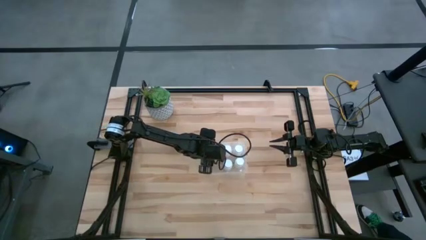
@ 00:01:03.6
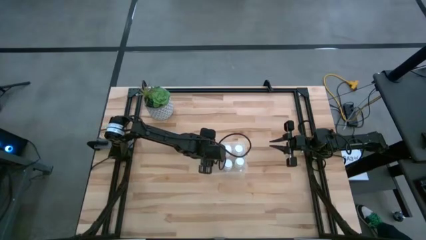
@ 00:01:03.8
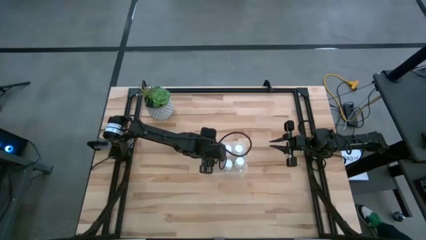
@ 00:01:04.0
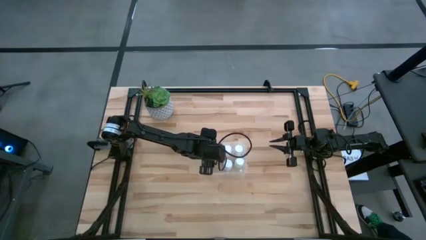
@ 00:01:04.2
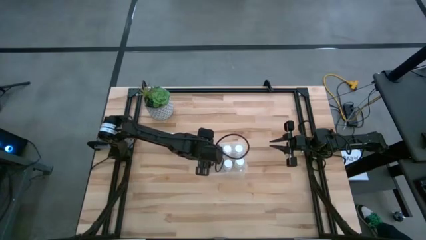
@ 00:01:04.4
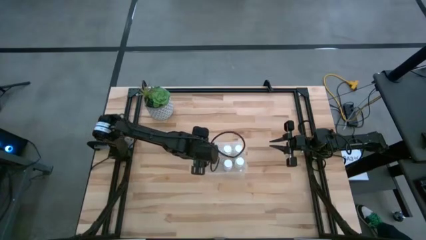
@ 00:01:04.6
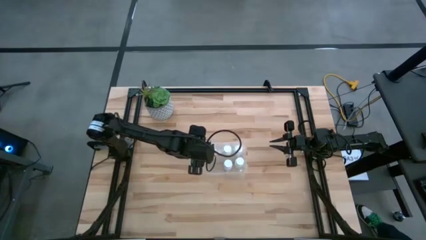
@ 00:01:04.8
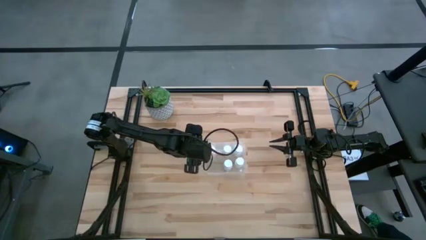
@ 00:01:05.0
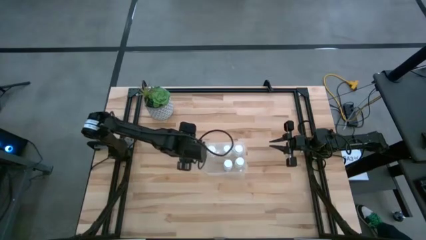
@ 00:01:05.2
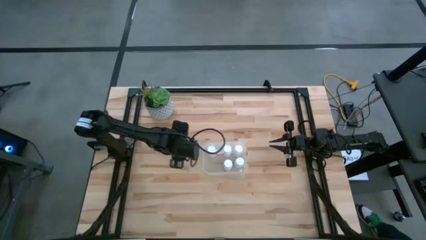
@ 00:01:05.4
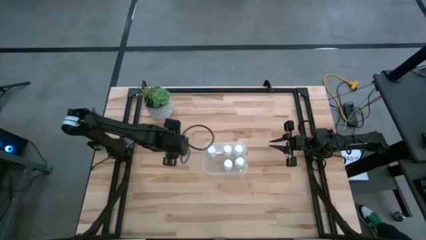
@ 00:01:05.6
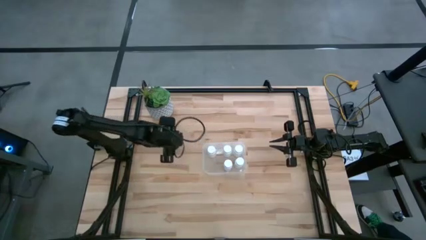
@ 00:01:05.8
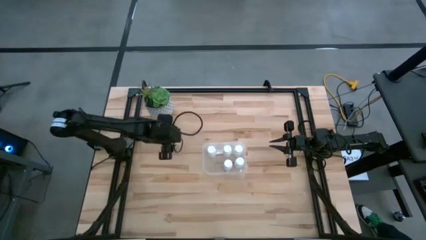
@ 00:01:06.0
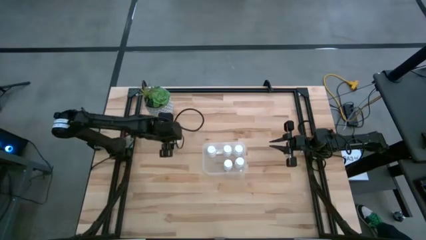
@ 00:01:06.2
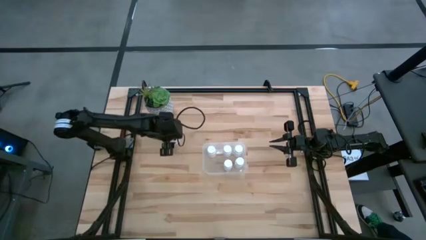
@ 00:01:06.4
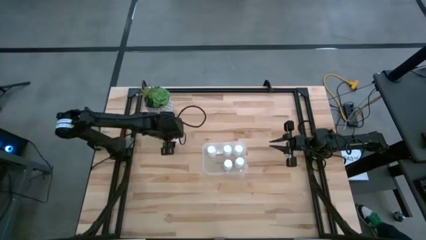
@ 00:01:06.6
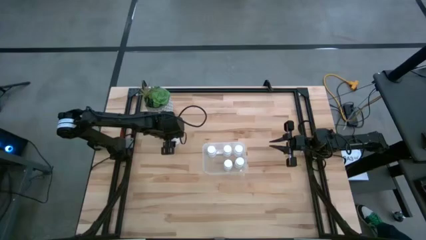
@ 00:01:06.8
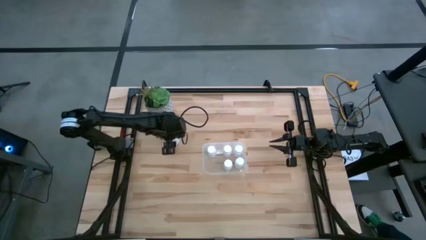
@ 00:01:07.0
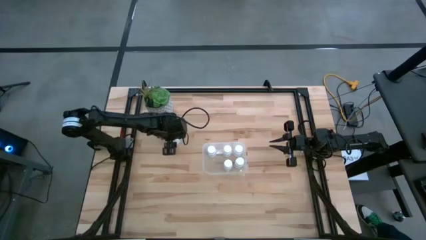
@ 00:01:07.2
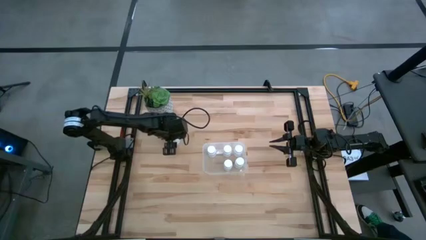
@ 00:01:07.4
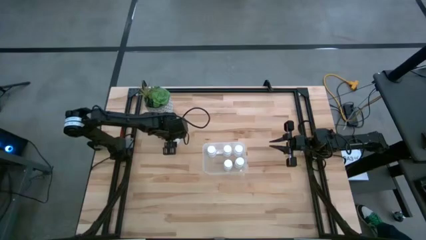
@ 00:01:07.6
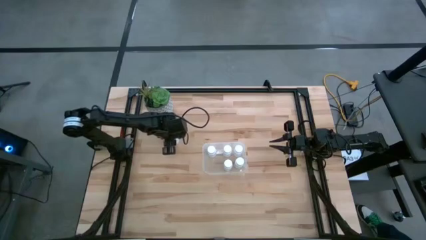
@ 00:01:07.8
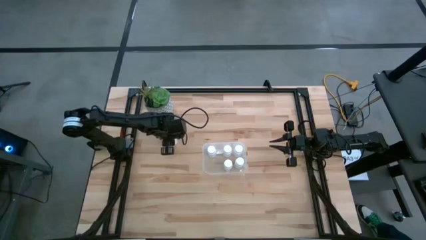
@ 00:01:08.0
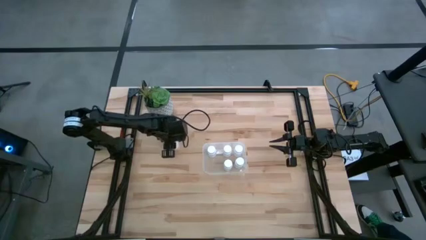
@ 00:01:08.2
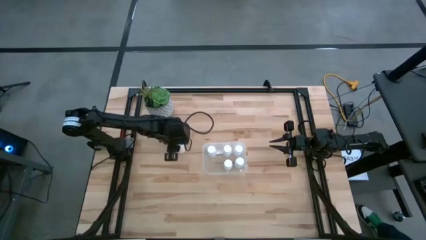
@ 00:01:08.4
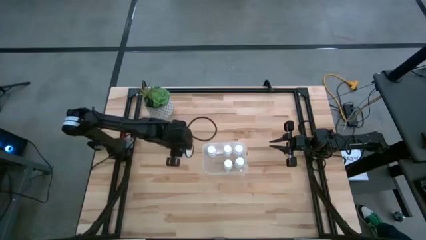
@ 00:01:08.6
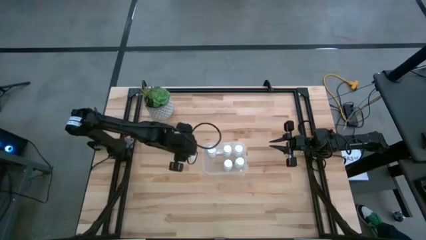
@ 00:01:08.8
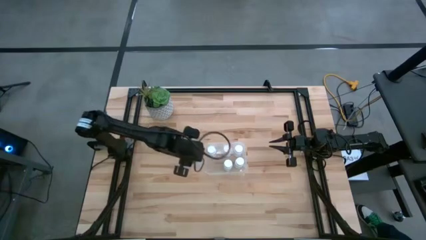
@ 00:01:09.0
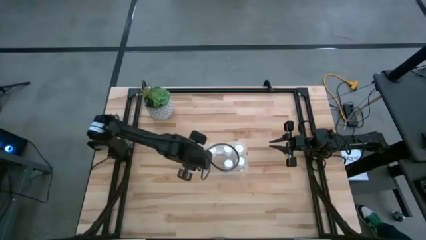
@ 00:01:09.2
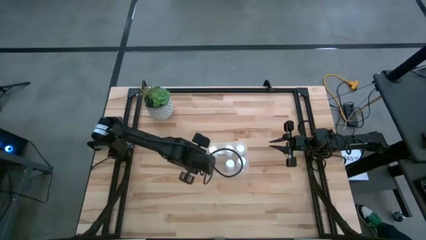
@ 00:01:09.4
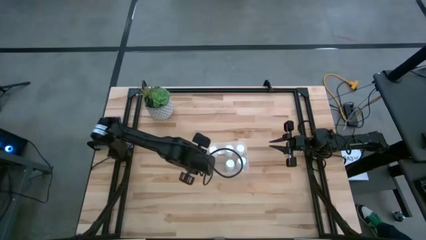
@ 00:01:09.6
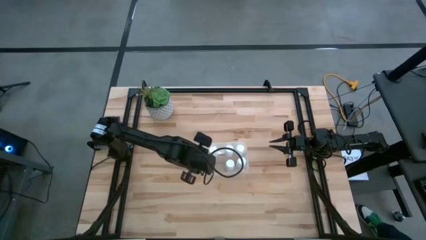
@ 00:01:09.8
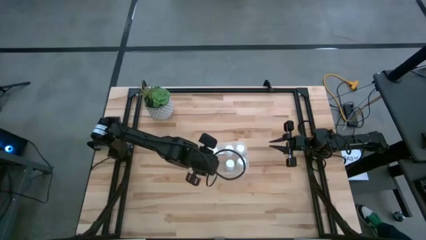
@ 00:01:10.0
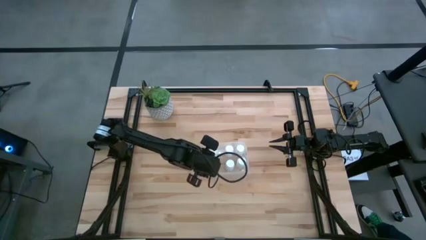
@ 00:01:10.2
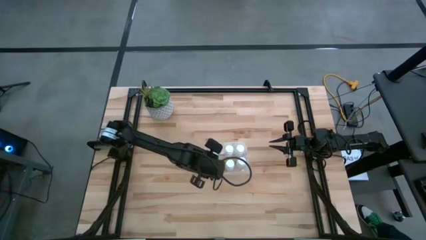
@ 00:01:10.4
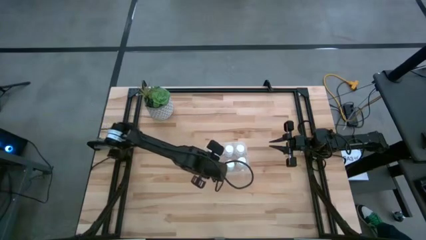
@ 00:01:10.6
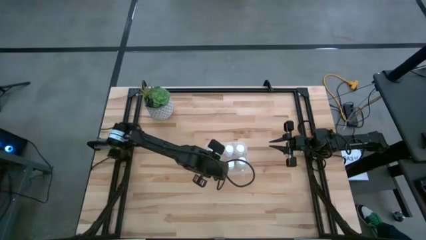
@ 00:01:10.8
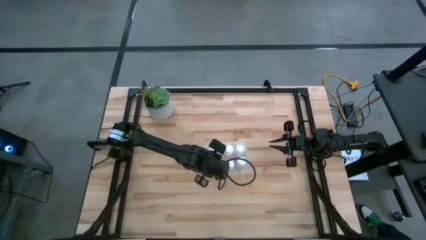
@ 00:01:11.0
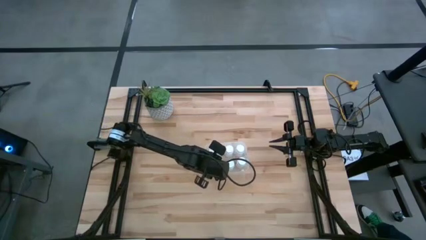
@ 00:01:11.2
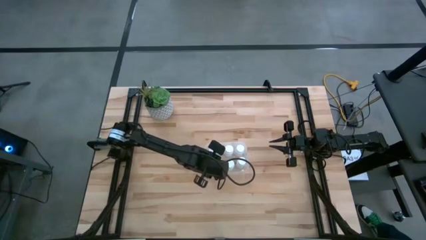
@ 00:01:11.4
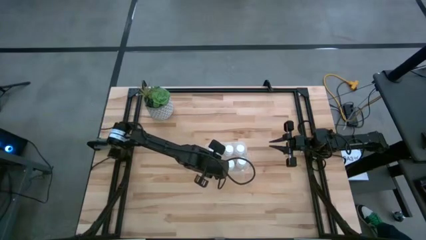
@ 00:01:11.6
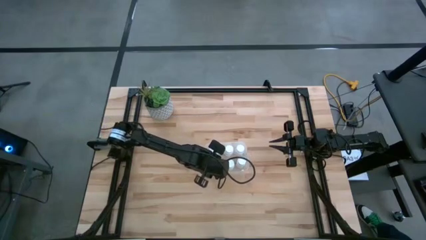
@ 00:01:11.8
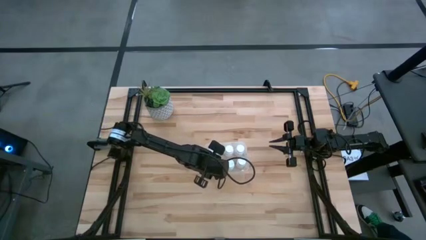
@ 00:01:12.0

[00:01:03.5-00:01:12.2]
Task: Pick and place pill bottles into a basket
Put the white pill bottle into the transparent bin

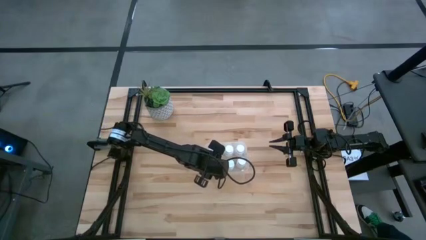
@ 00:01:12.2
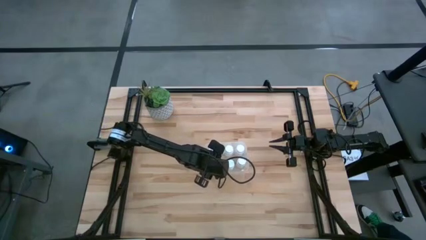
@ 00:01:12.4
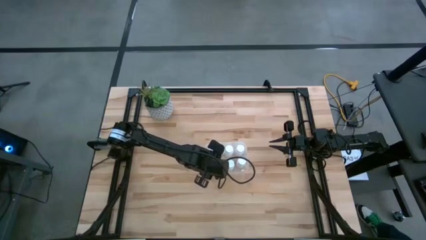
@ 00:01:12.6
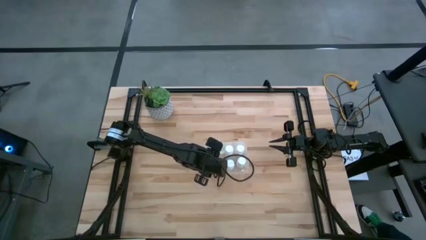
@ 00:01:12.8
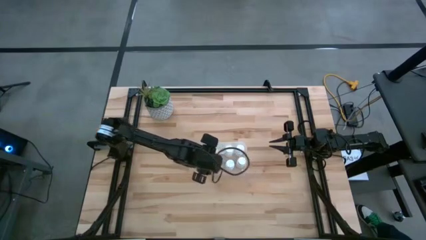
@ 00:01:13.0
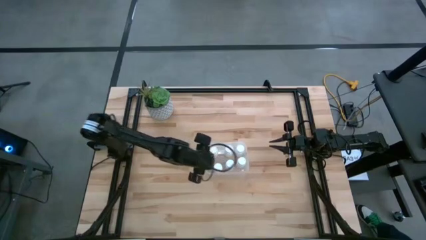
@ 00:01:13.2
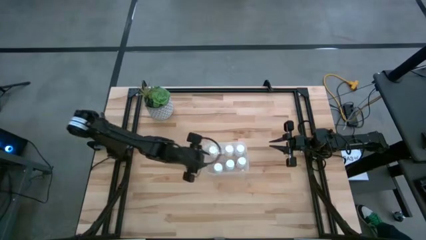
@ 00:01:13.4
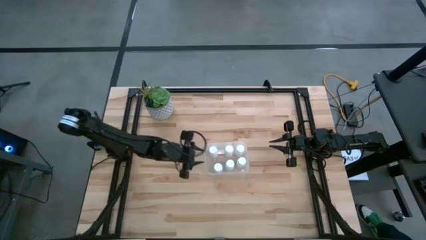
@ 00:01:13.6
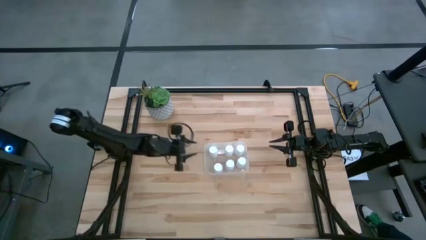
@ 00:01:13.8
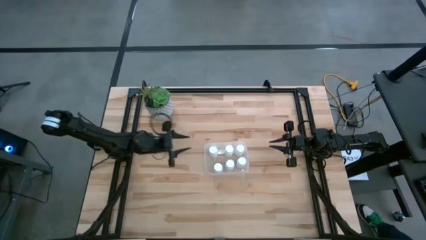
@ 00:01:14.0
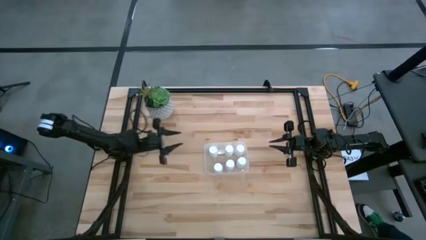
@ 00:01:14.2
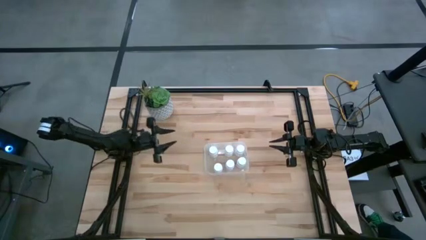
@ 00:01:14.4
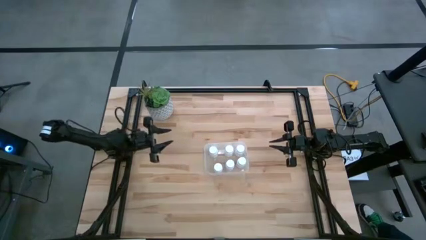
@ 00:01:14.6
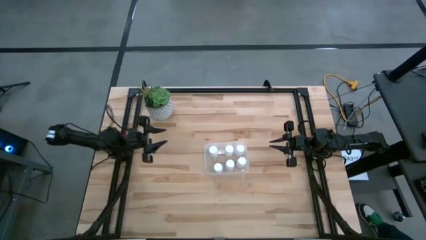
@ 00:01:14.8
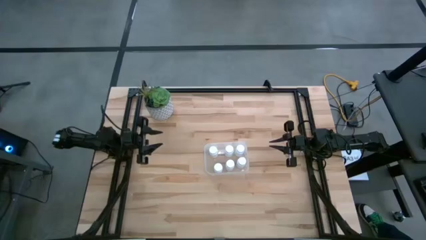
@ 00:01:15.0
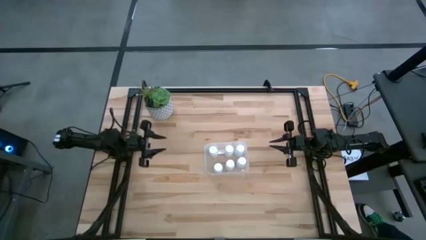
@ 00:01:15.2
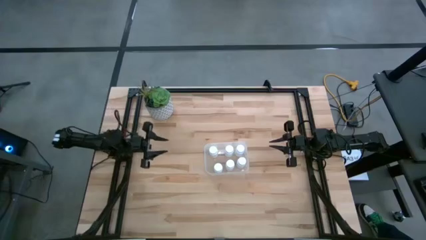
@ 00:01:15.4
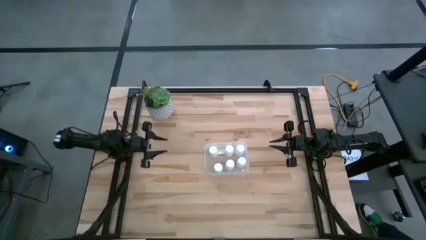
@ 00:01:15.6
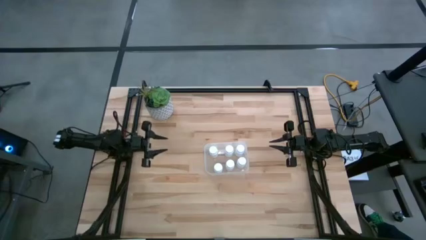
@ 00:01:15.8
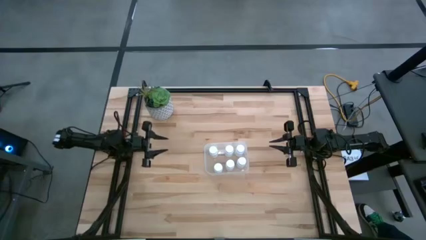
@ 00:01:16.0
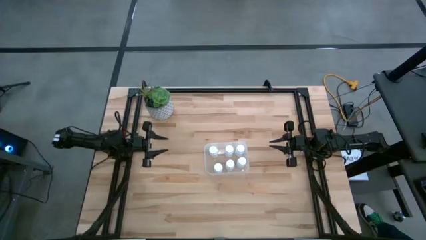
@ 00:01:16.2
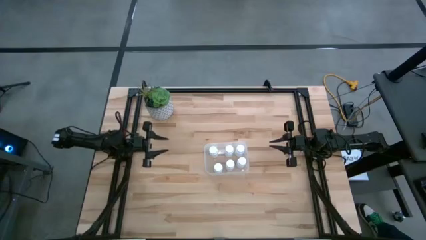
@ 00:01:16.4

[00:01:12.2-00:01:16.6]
Return to Home Position
